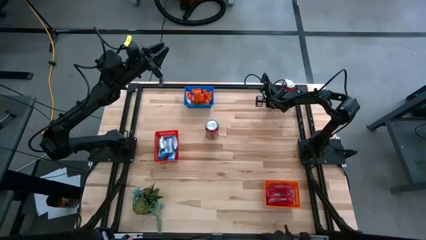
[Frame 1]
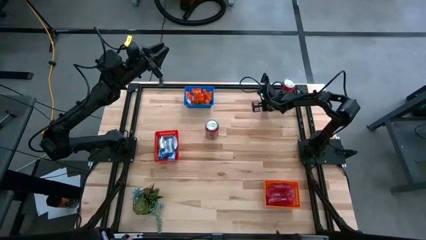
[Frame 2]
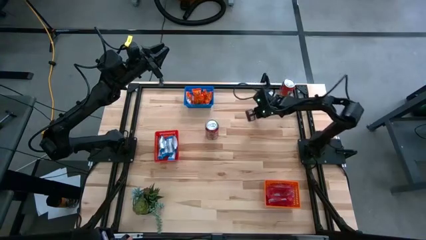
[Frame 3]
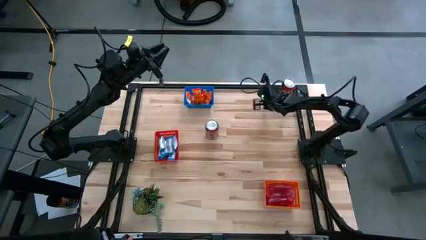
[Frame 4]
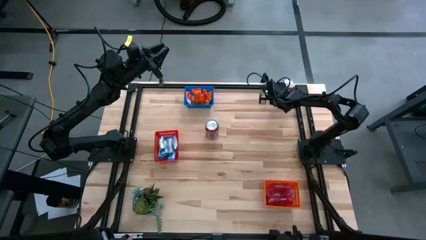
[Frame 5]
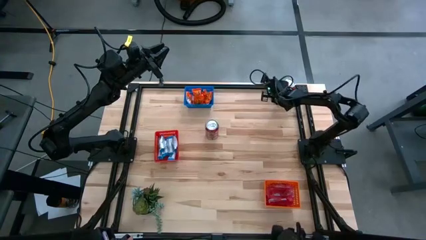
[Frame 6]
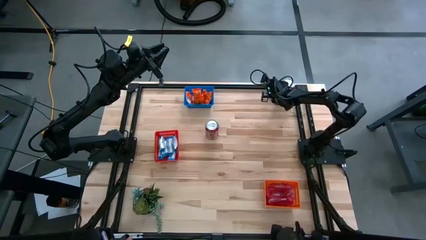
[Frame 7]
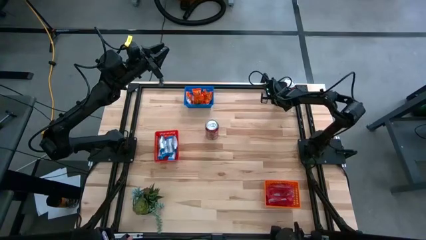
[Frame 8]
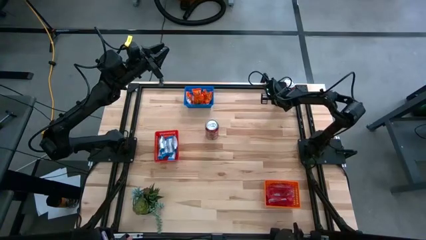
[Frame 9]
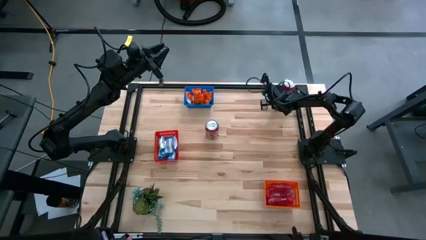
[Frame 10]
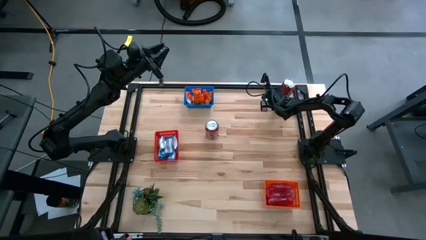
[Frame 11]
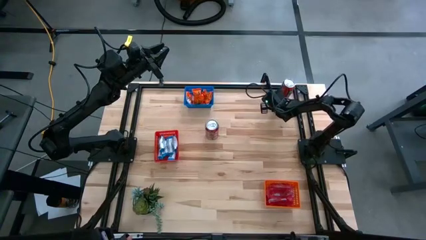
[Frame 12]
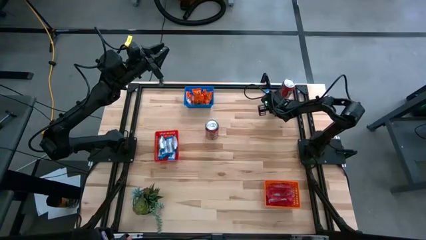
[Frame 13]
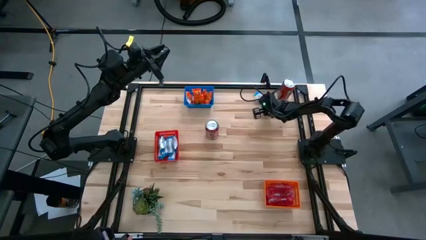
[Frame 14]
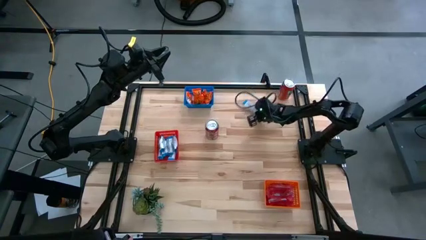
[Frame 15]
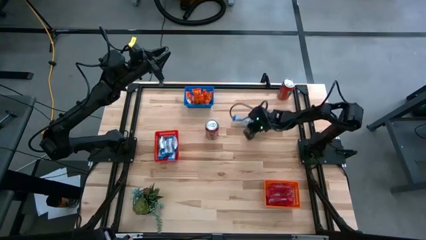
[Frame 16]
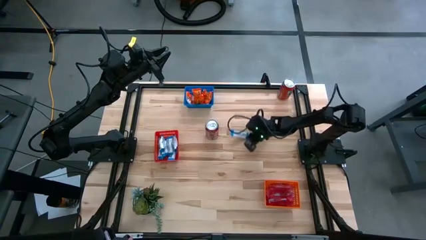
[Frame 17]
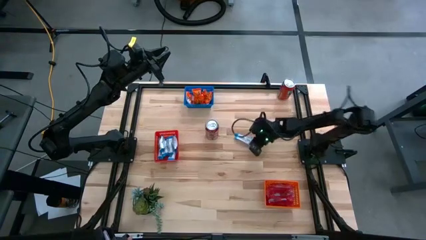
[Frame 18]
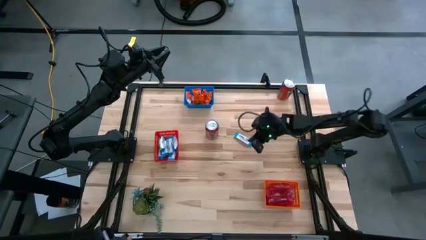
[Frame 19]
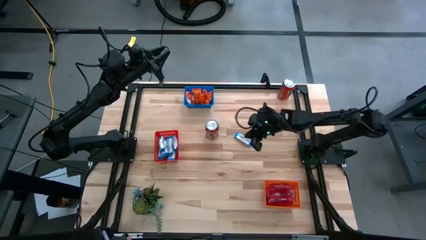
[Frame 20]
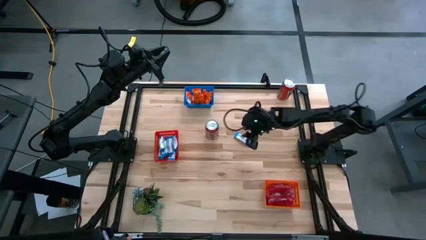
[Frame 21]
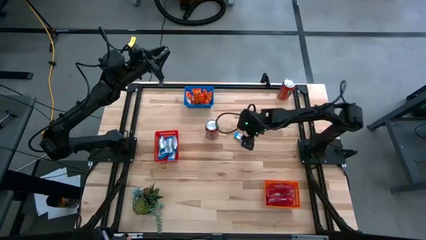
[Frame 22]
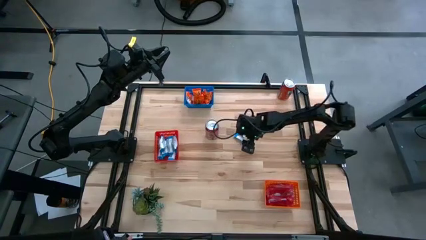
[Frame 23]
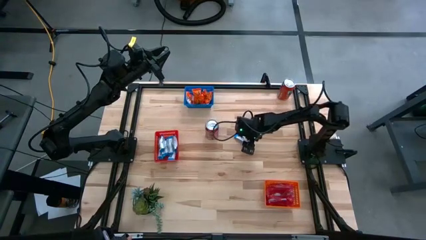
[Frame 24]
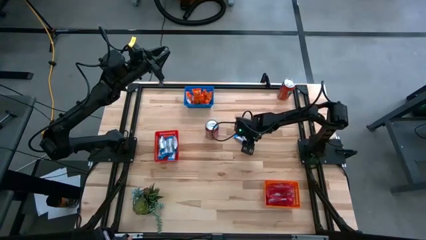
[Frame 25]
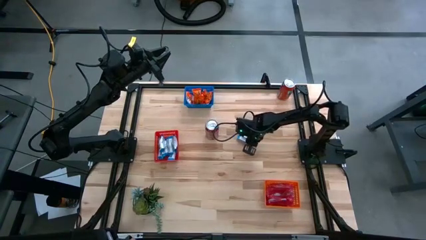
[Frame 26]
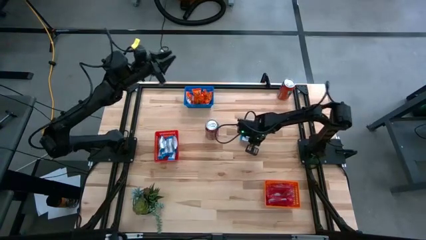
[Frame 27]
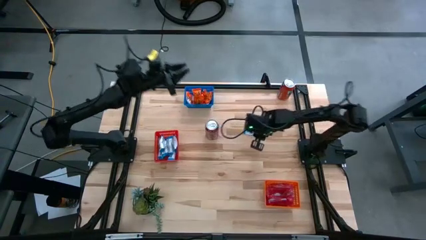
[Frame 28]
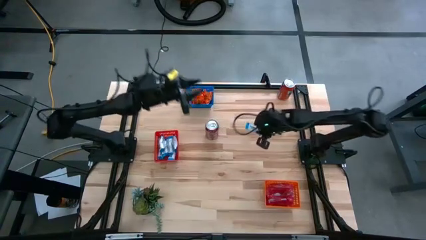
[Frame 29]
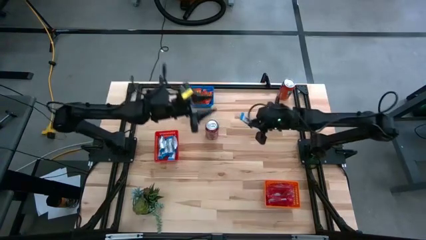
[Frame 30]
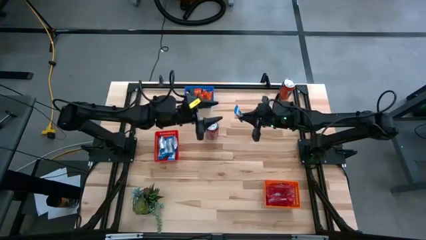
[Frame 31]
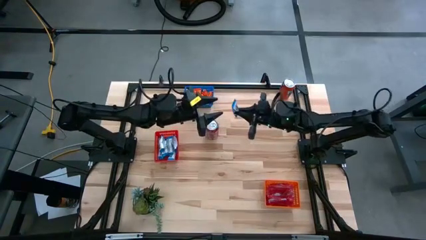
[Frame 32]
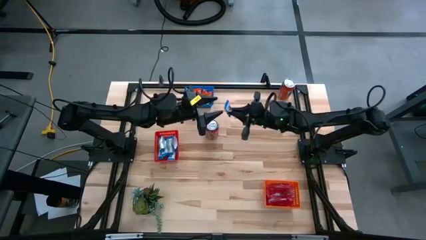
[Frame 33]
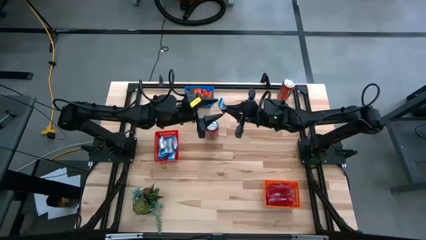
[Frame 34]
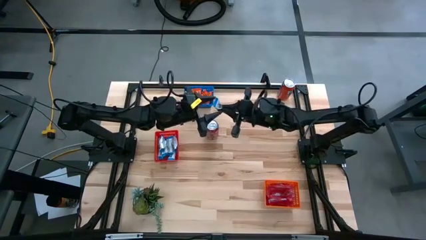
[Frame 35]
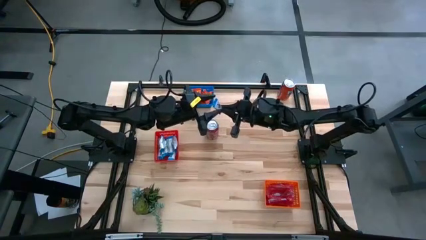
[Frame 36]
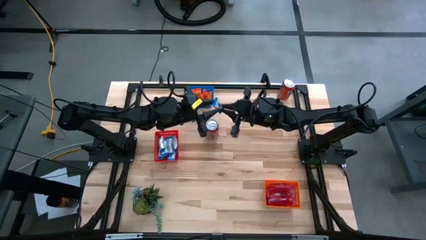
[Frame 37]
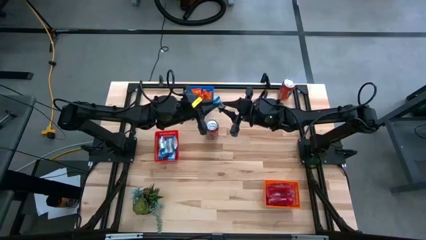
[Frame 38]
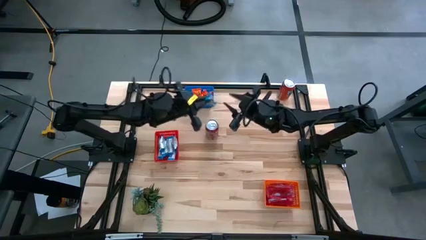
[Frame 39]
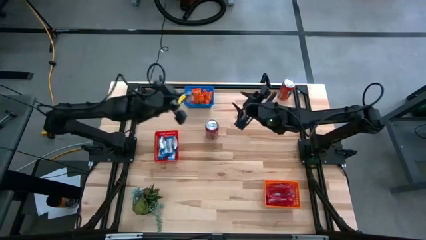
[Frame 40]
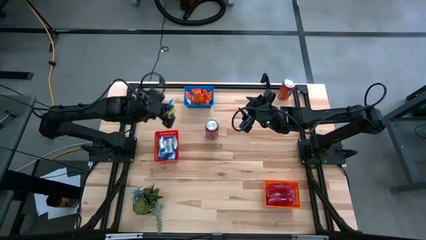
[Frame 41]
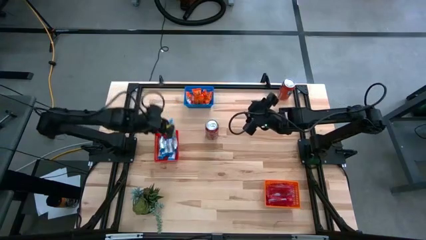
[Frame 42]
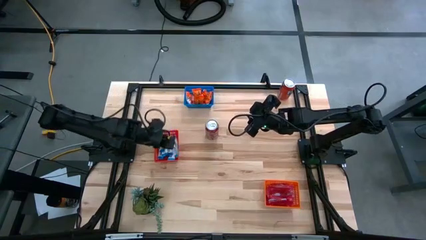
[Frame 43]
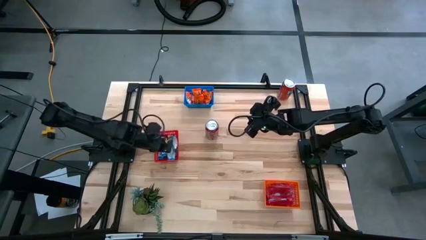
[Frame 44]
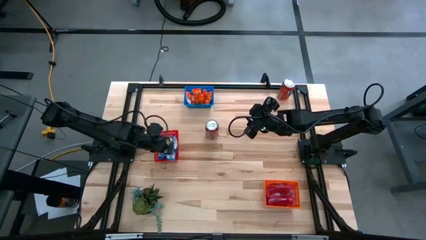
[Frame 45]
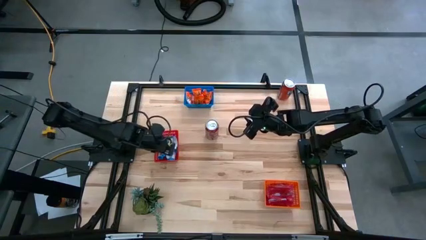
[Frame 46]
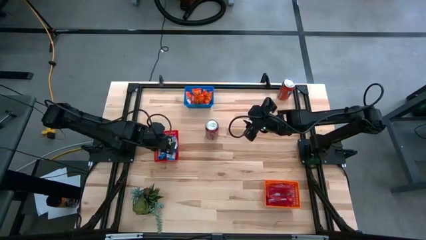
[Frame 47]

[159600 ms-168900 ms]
Task: Sort candy
Put the white chocolate into the red bin

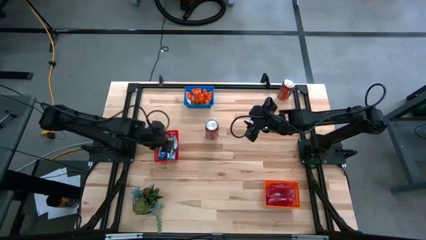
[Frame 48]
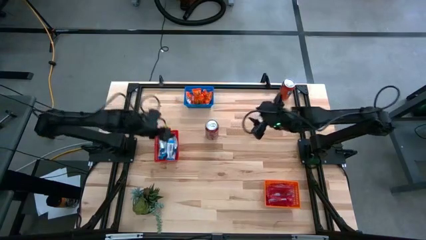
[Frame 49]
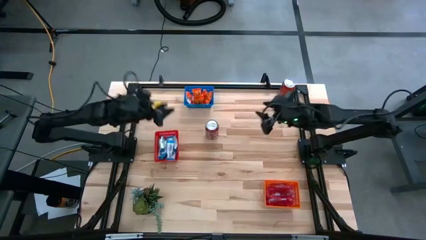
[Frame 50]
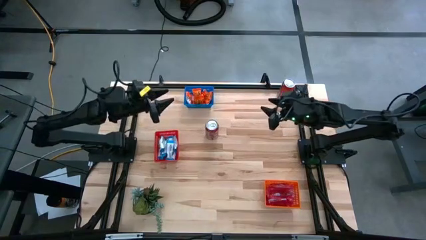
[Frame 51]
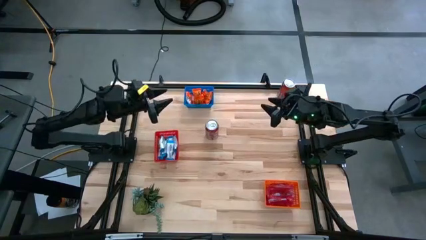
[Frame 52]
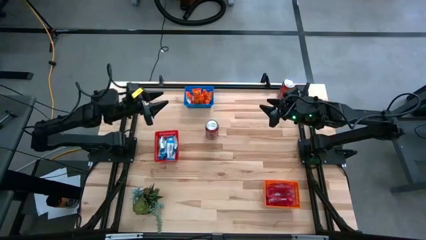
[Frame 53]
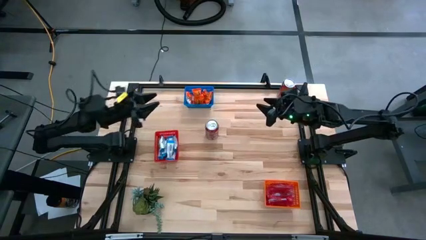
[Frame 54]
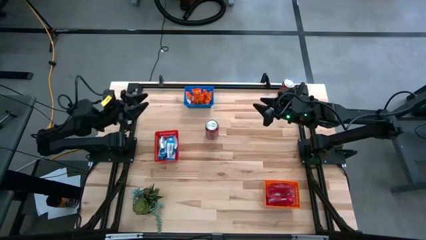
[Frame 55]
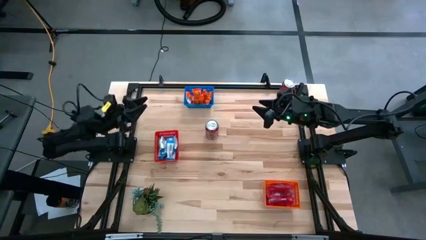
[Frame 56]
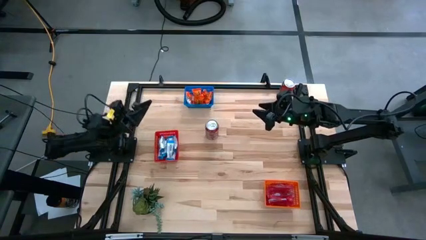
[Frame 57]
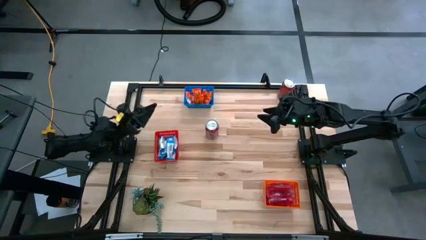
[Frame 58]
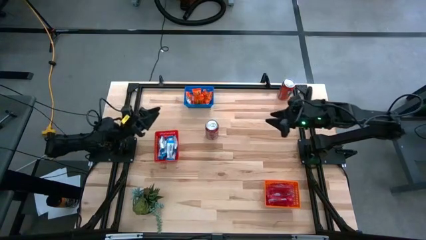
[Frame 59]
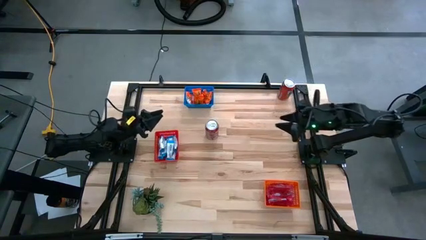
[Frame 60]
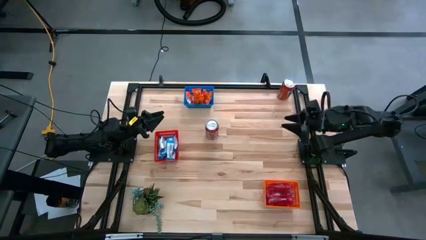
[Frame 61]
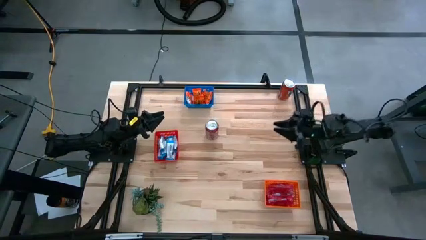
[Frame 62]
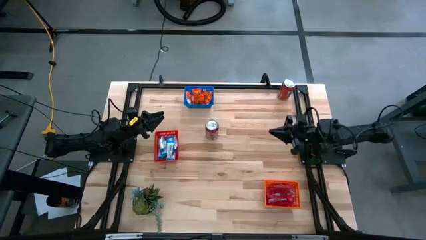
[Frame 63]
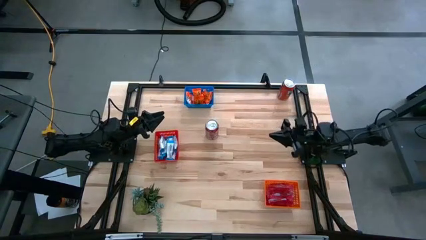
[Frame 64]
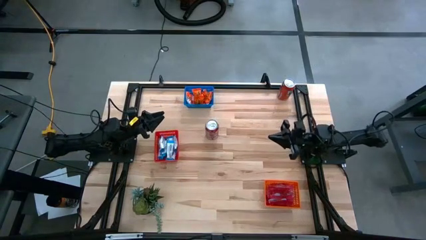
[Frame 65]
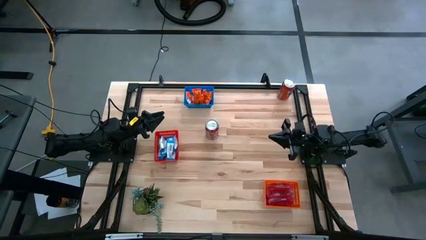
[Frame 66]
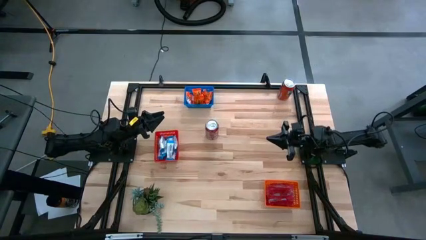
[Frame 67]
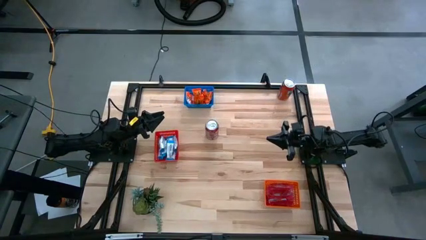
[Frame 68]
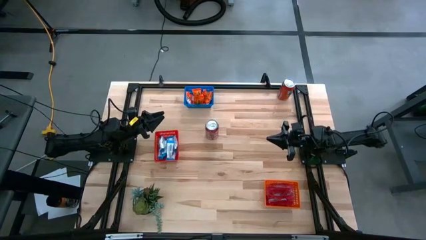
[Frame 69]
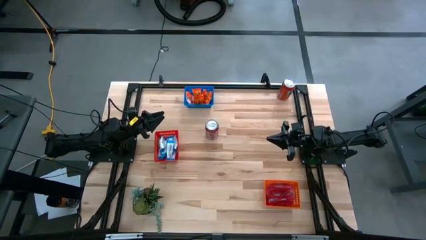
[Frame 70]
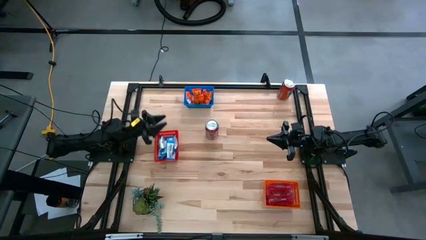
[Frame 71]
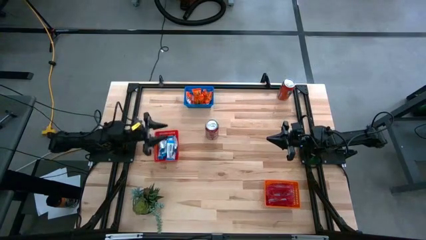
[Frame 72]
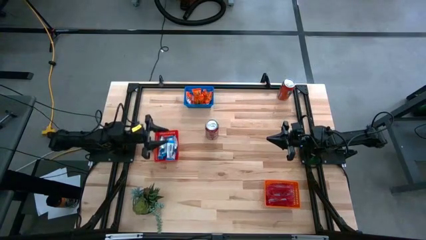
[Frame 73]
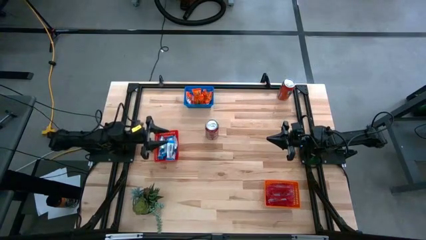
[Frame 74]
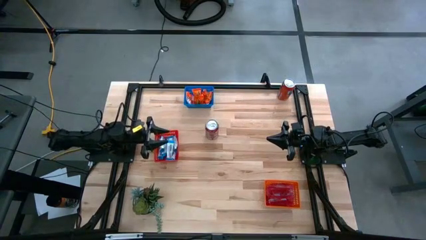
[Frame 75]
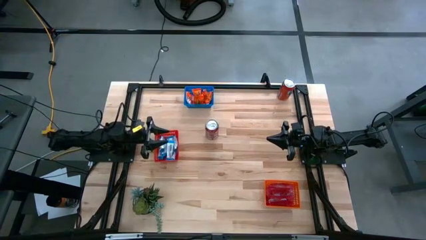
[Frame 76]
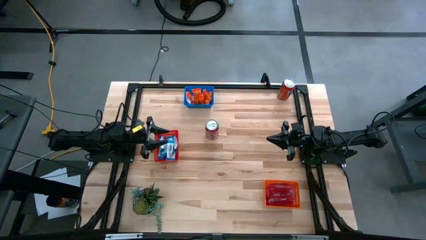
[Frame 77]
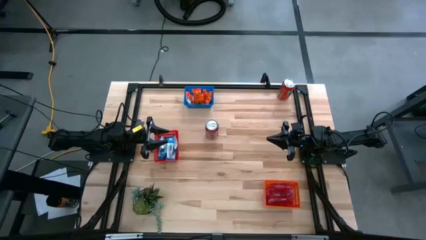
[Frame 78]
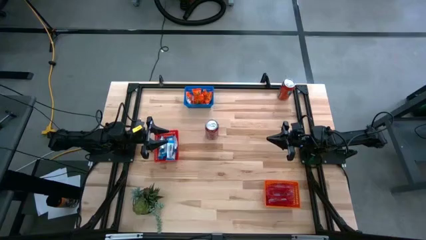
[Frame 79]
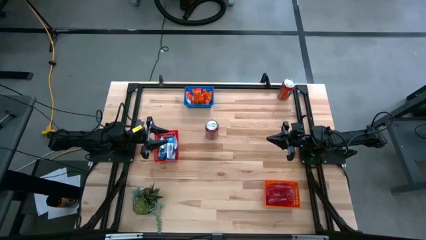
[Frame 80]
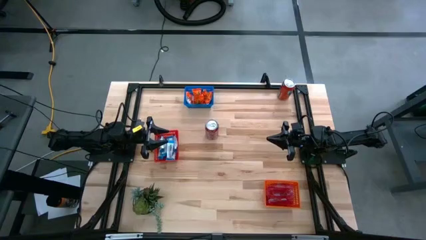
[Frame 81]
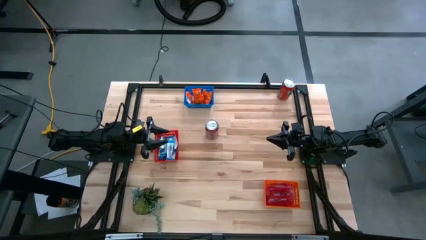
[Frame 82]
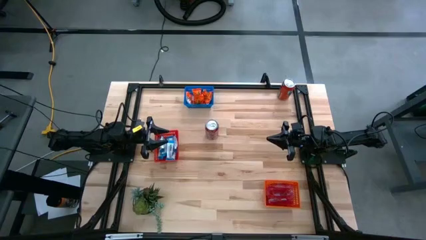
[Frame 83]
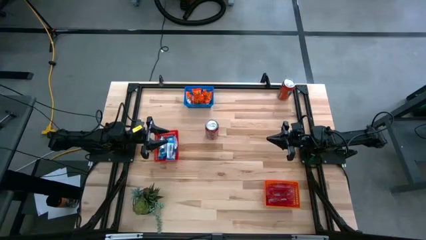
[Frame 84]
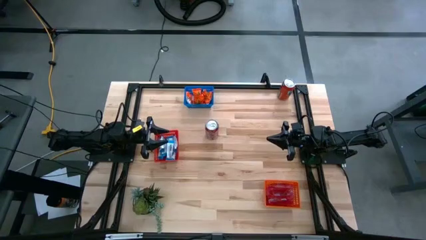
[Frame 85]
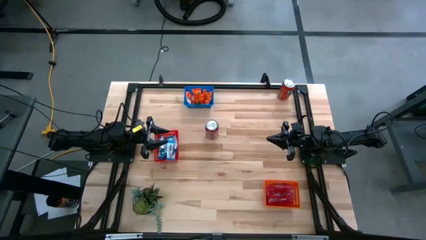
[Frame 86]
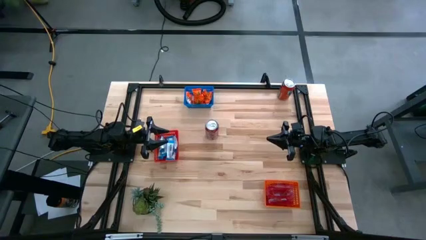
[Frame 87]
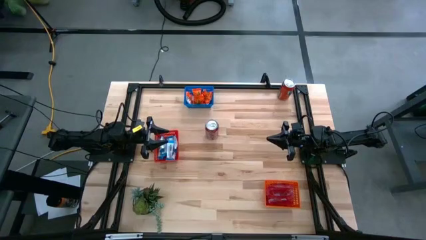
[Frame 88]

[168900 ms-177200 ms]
Return to Home Position
